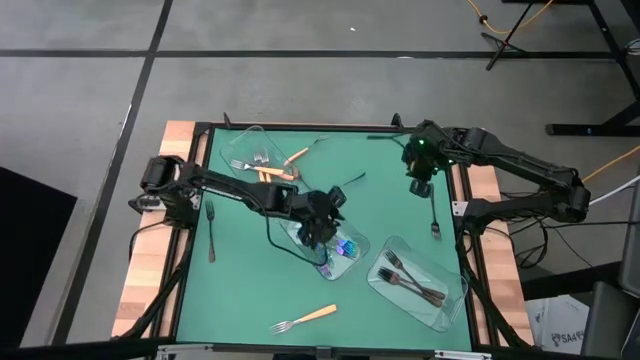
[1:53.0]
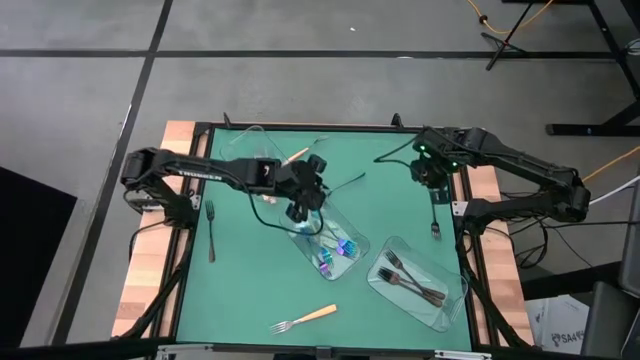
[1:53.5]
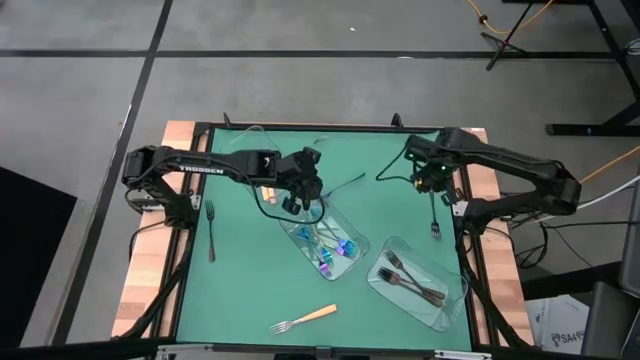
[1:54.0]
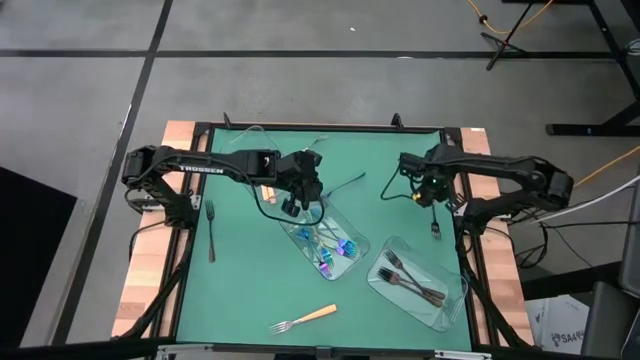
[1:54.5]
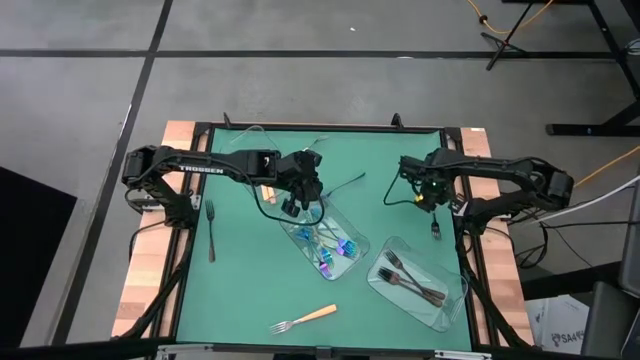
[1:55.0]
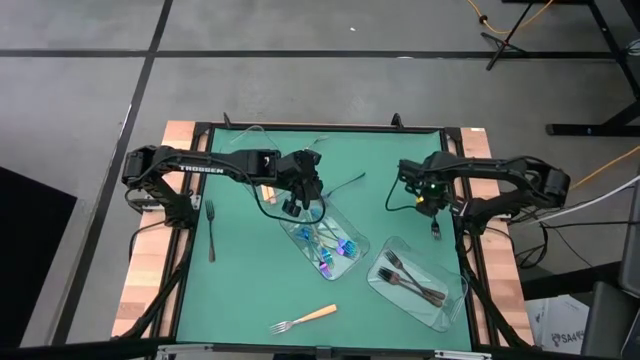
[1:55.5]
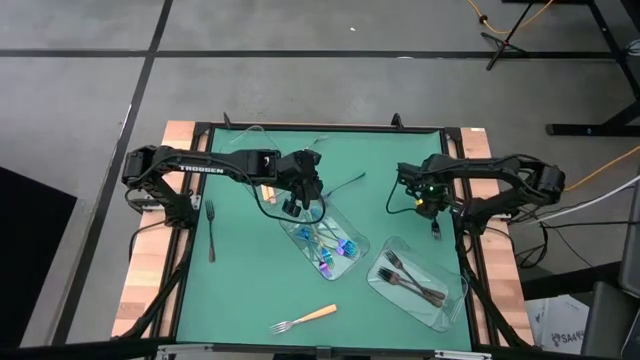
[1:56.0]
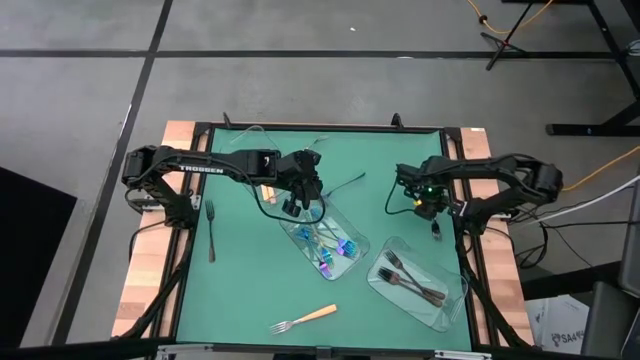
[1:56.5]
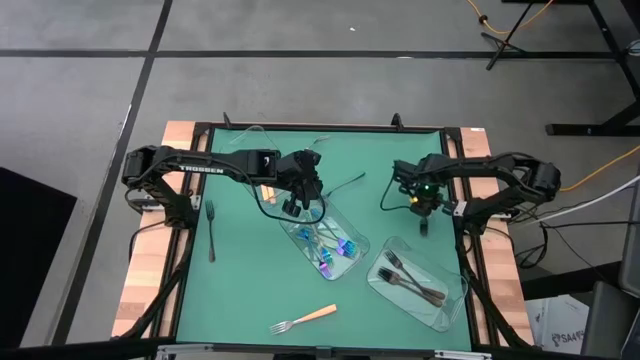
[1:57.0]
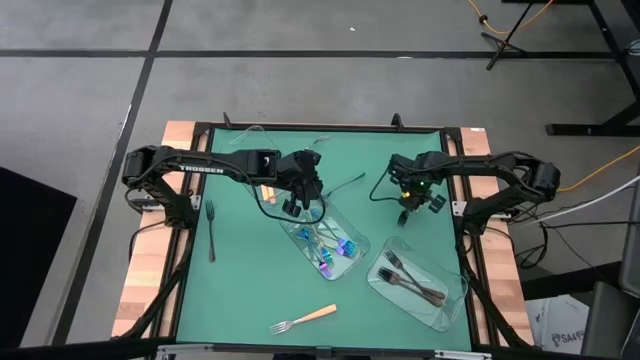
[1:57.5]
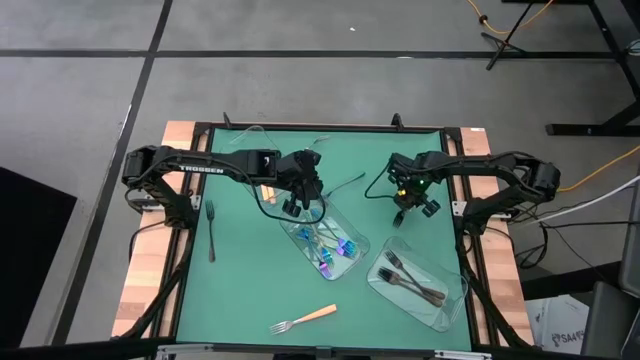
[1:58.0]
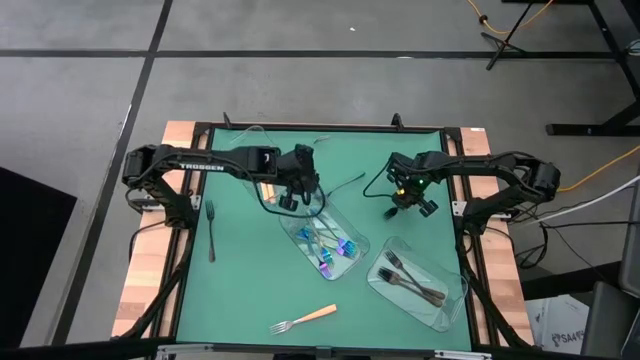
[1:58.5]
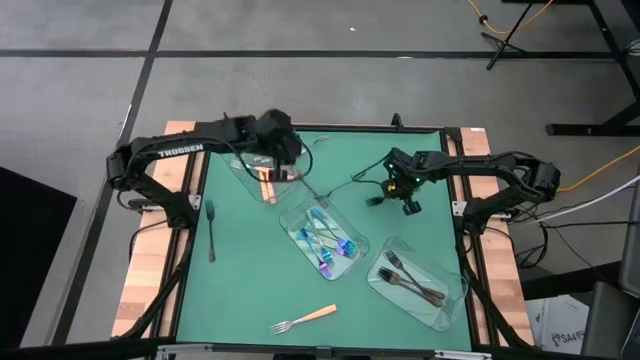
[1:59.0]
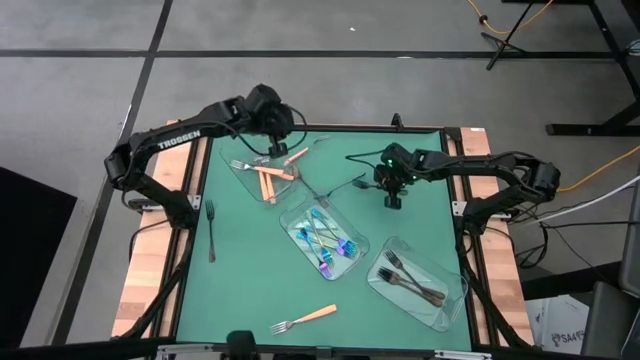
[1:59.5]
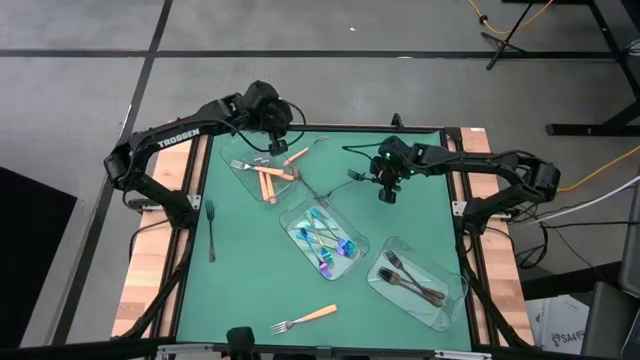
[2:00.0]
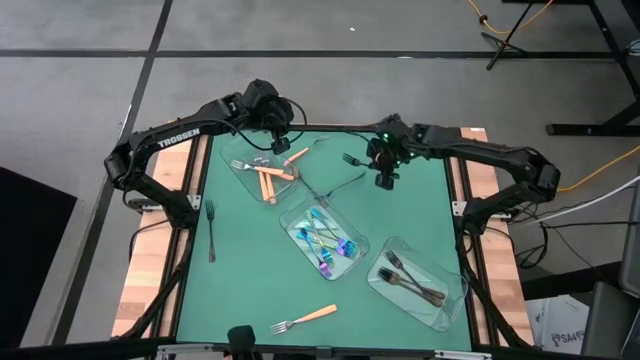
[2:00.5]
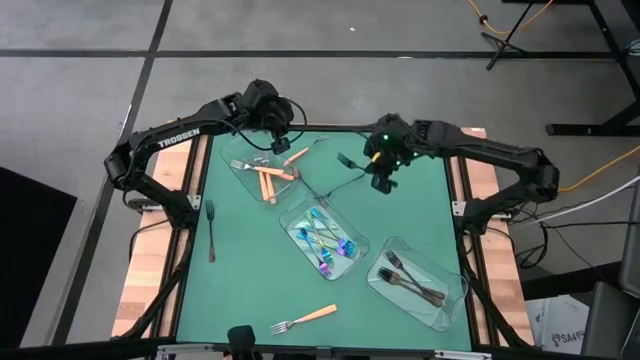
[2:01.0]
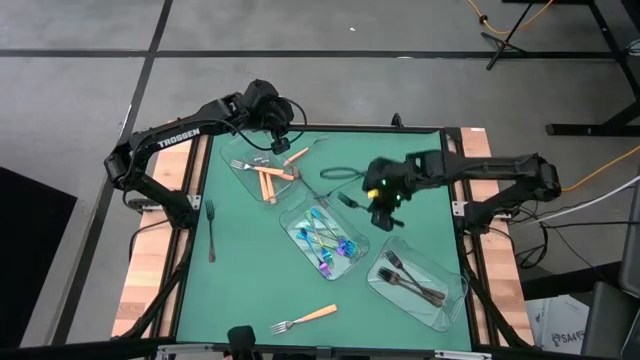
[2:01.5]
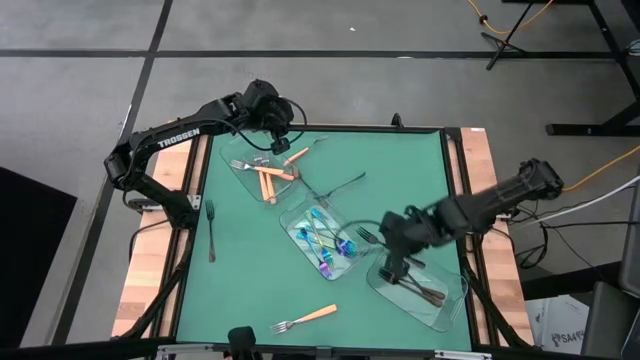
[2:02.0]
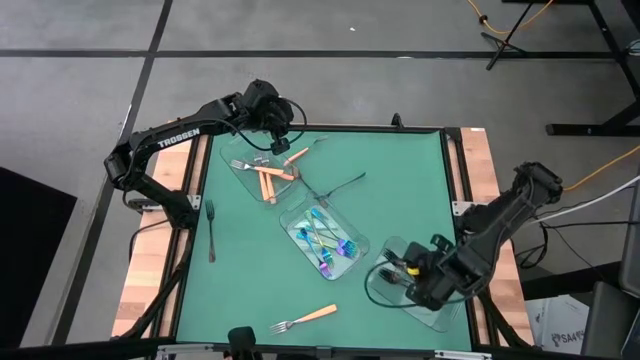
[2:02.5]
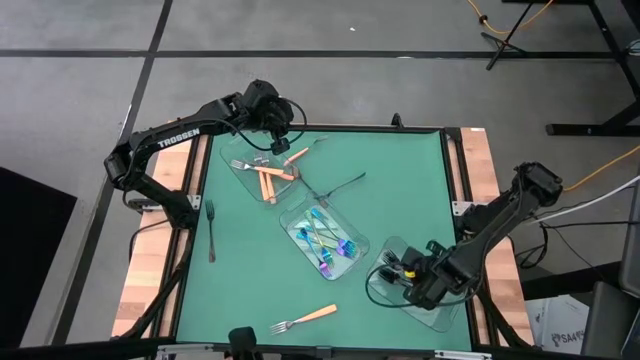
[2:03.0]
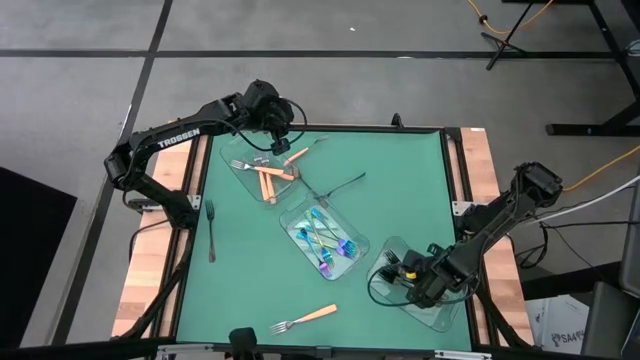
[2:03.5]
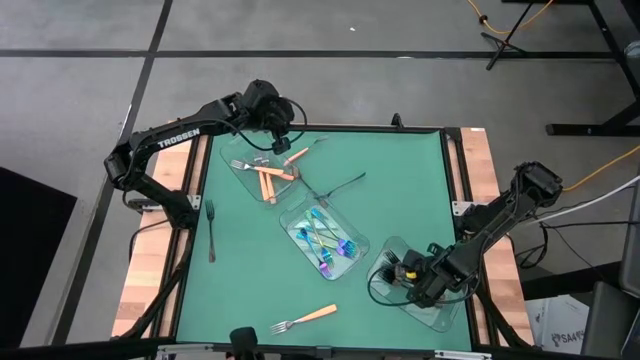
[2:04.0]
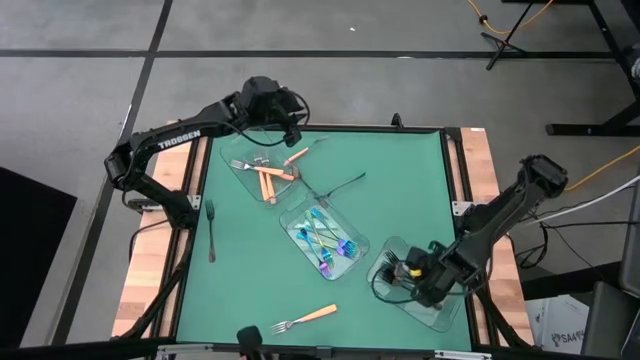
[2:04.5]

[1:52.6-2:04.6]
Task: Sort silverware by color (type)
Put the black fork into the bottom transparent bin

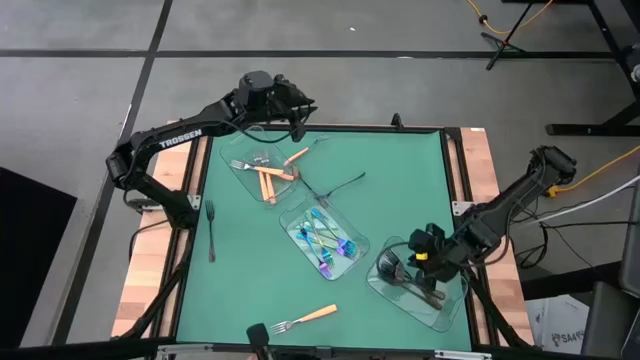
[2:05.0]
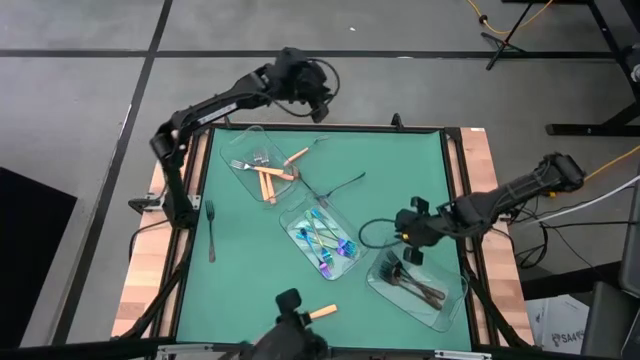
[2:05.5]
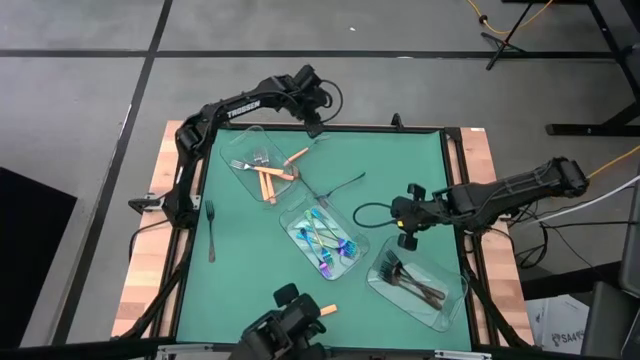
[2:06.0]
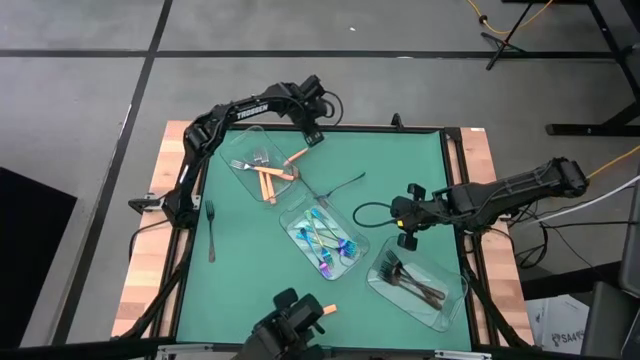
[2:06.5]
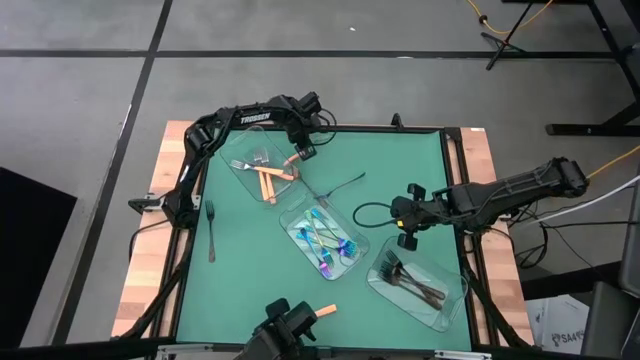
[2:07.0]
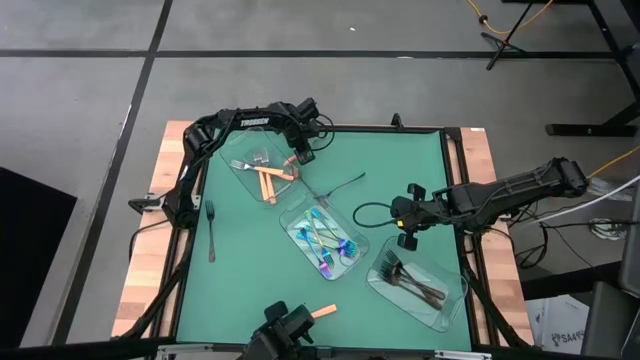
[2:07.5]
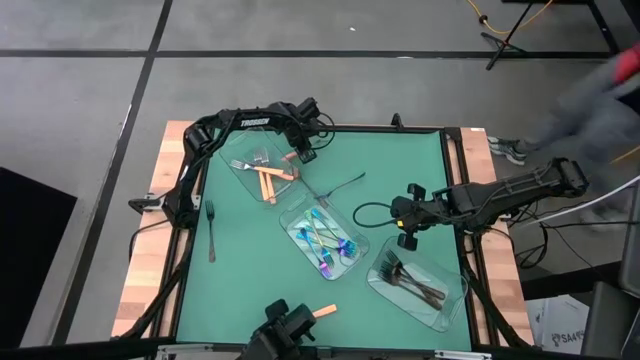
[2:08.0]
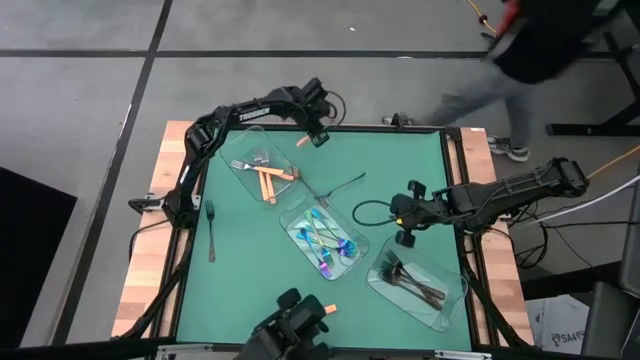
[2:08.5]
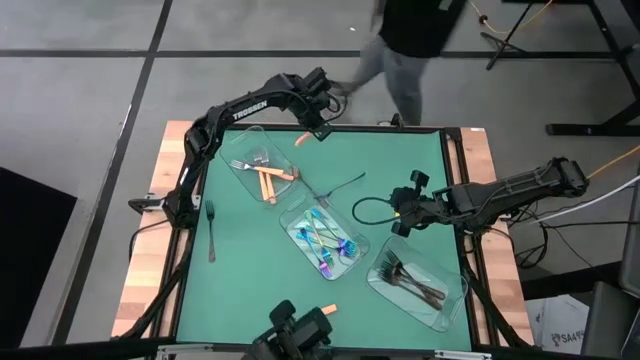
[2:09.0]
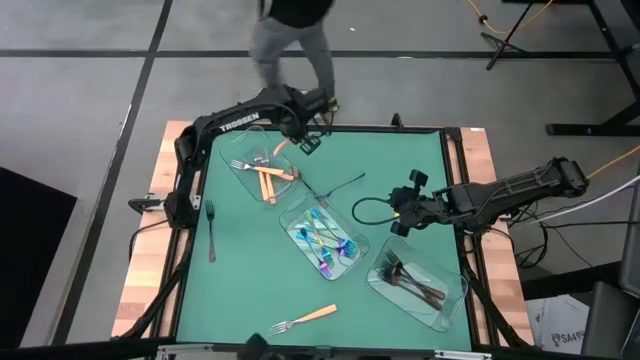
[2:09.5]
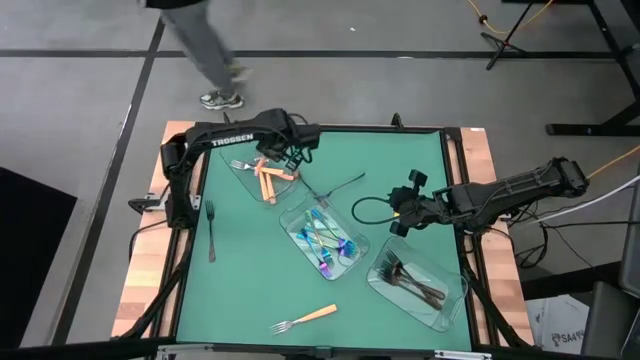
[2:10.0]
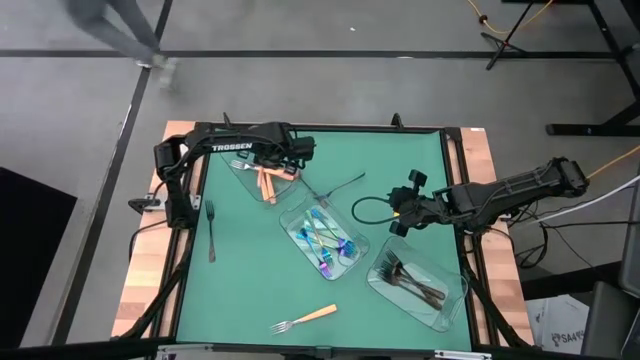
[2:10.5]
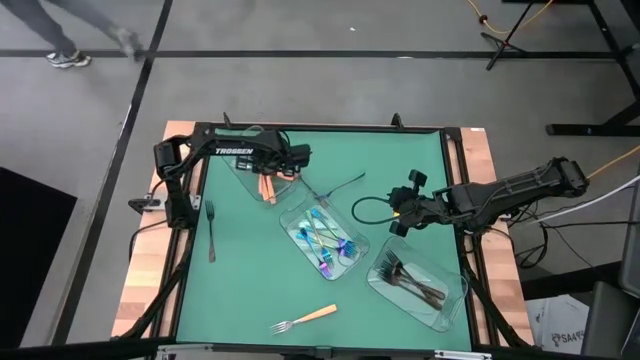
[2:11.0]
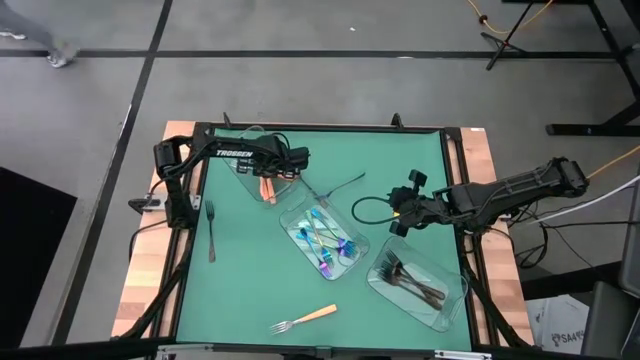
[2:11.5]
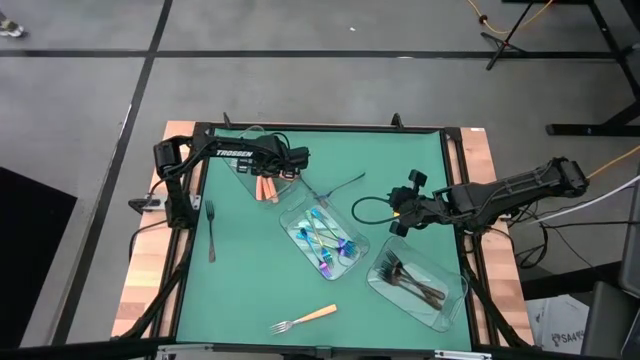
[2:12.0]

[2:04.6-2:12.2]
Put the yellow fork into the top transparent bin
